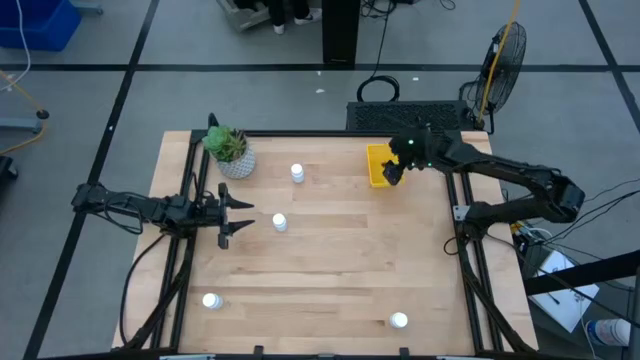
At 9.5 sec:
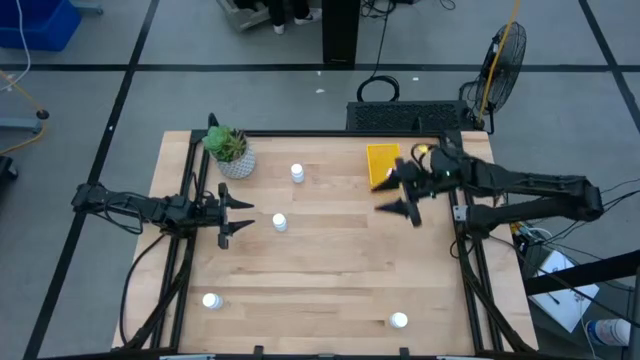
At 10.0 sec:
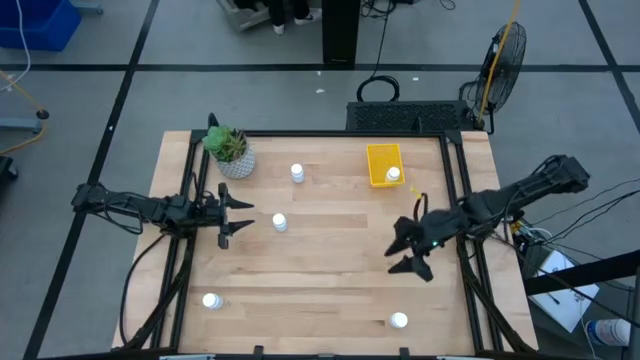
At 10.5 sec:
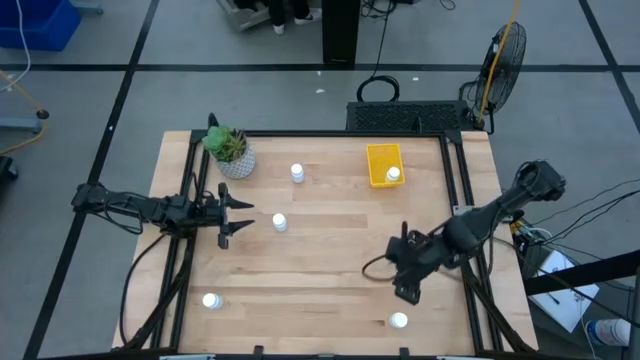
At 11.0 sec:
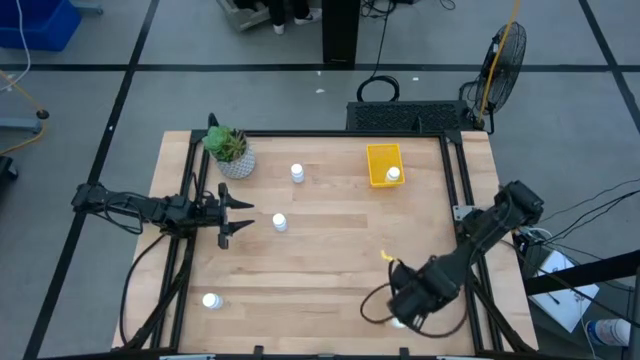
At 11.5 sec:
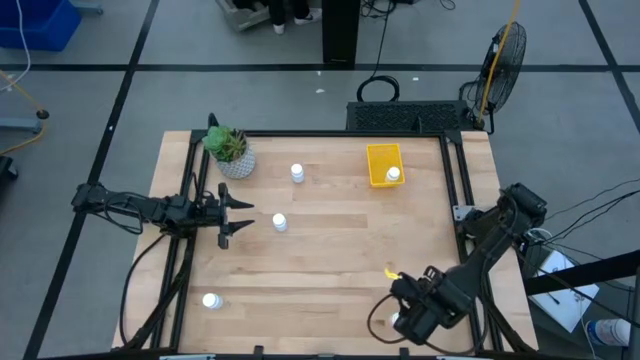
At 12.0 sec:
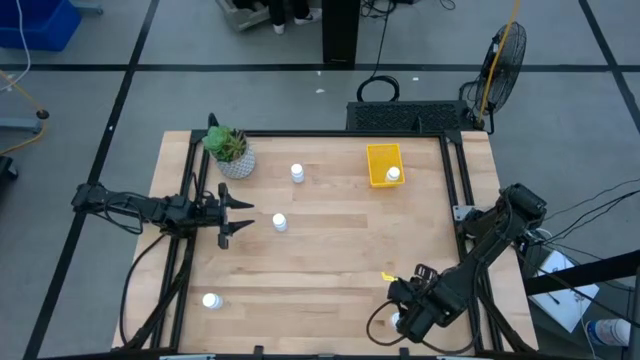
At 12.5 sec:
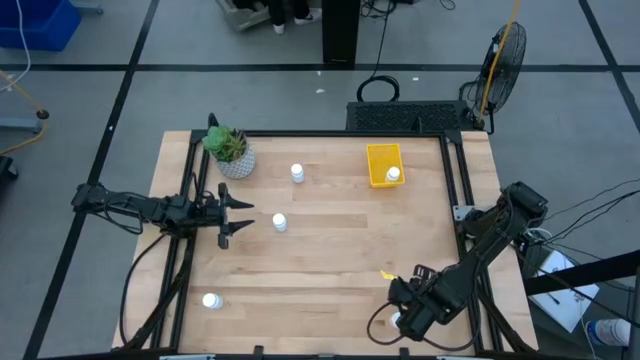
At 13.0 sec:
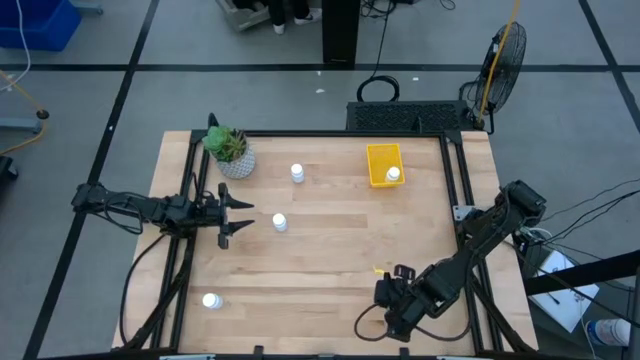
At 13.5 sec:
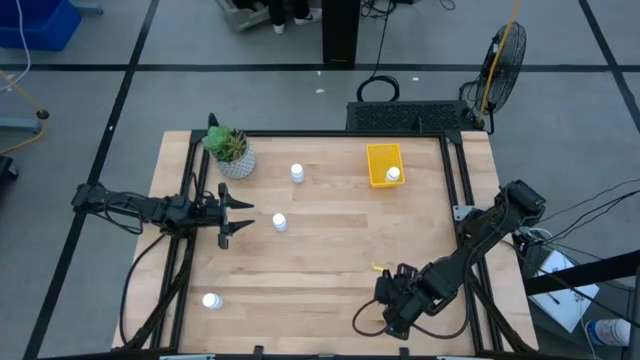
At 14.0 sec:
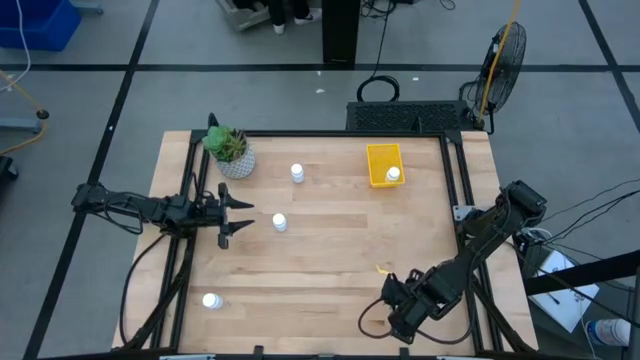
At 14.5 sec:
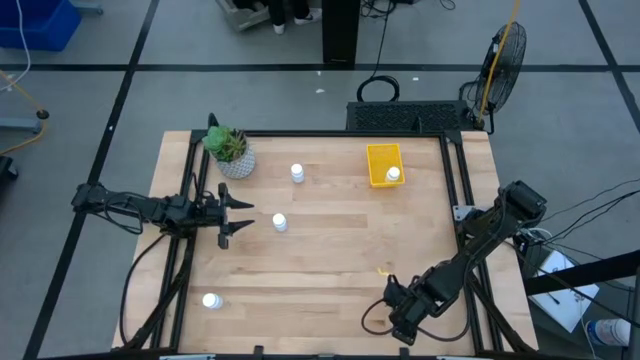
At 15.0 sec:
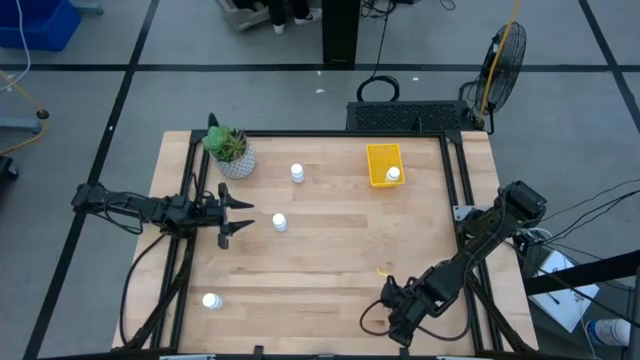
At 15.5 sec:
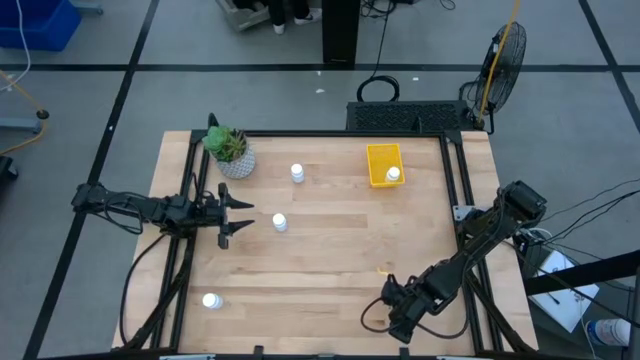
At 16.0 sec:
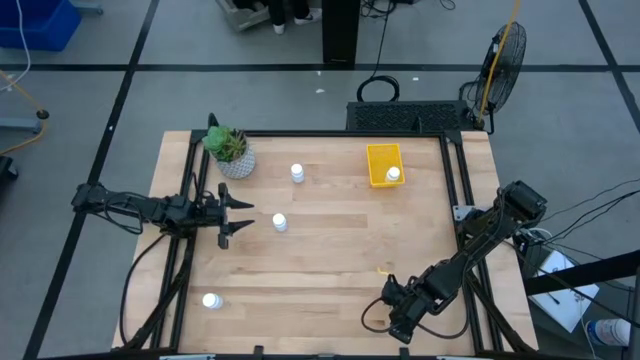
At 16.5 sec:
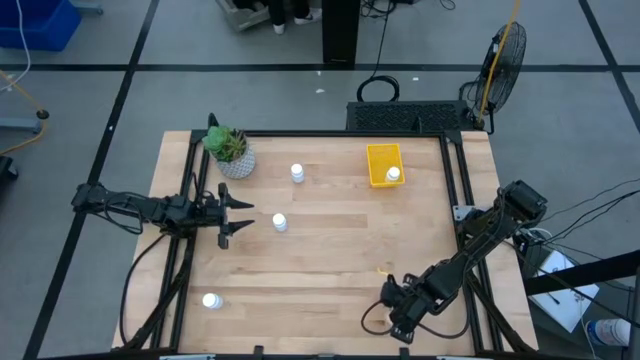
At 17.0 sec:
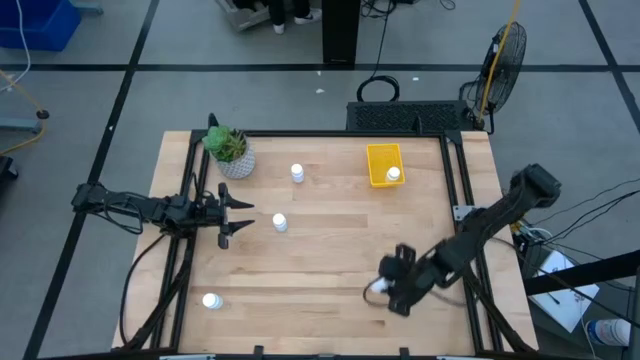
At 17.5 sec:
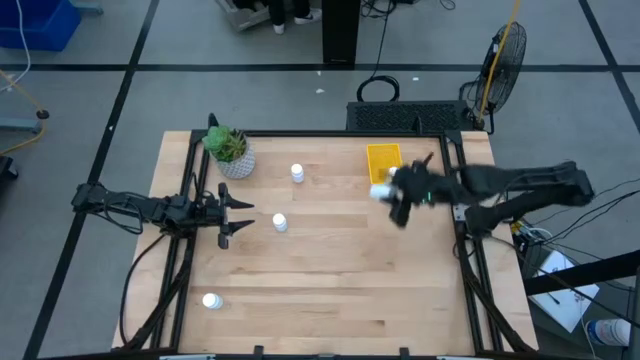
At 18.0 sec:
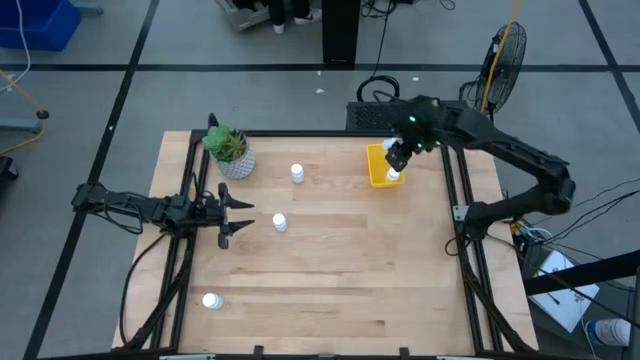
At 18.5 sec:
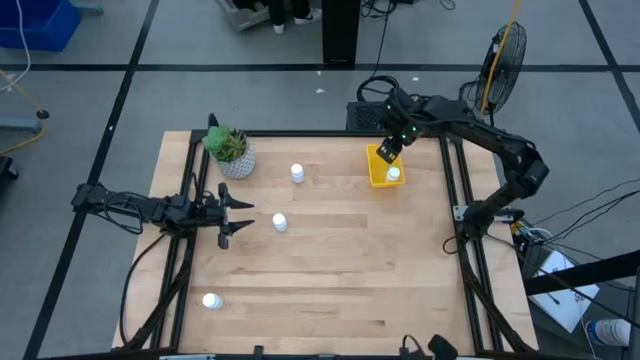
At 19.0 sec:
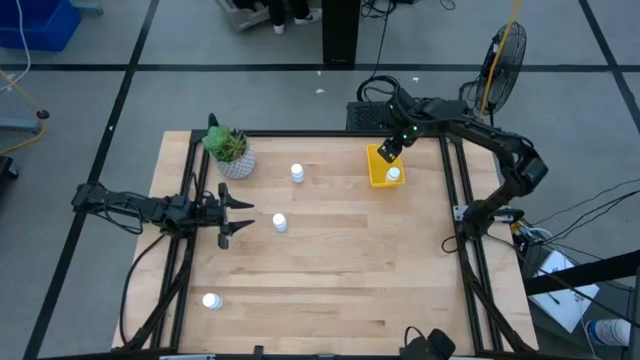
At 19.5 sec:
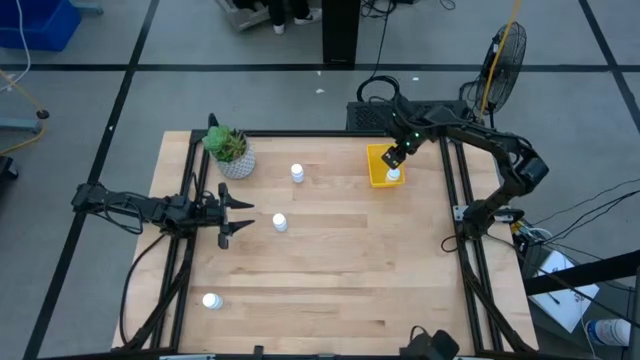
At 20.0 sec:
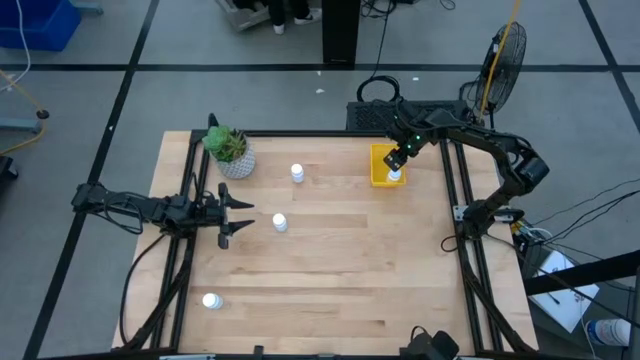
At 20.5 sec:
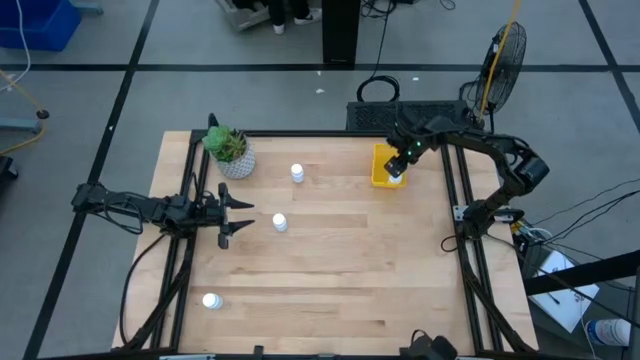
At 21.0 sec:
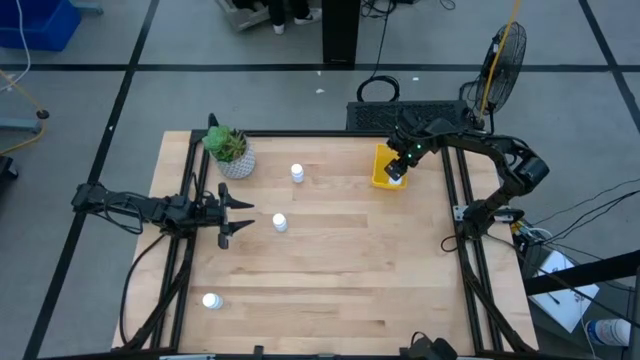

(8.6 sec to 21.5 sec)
Task: Pick and place pill bottles into a basket
Put the white medicine bottle into the yellow bin

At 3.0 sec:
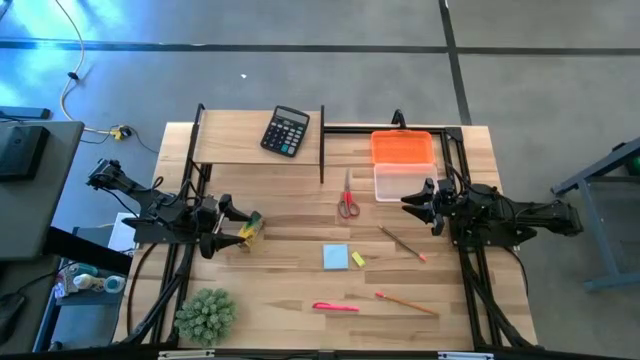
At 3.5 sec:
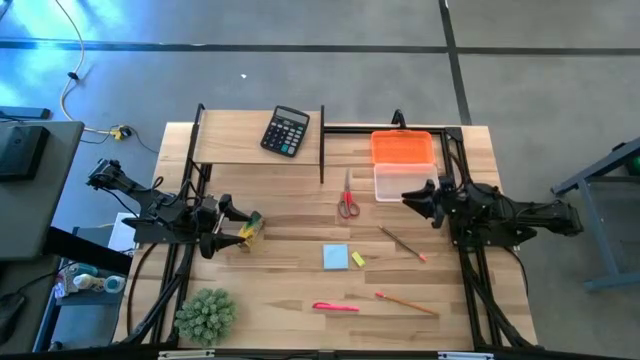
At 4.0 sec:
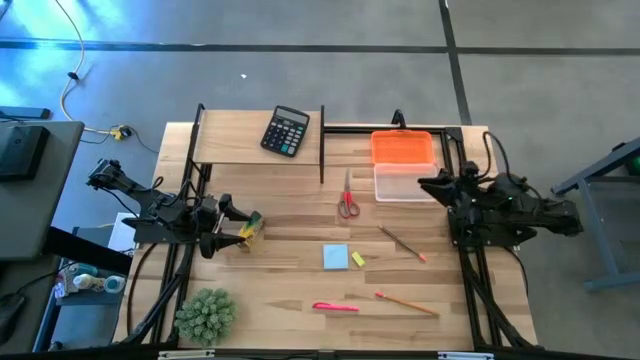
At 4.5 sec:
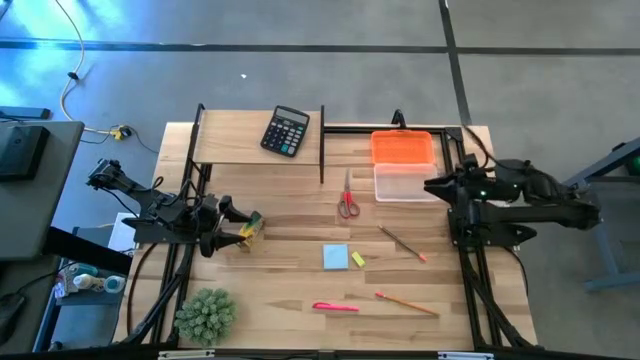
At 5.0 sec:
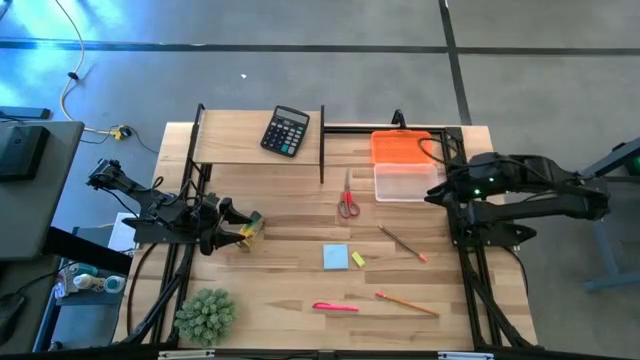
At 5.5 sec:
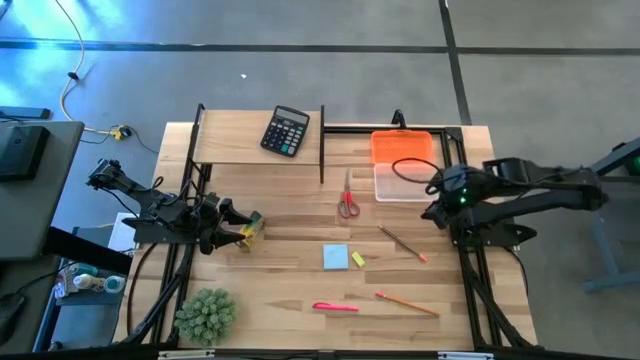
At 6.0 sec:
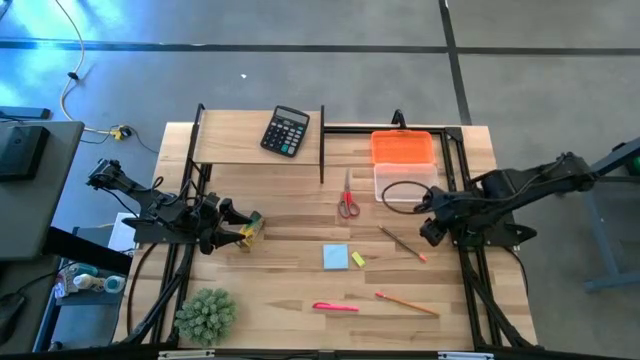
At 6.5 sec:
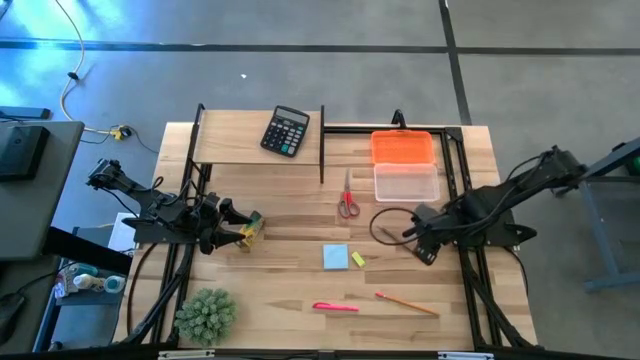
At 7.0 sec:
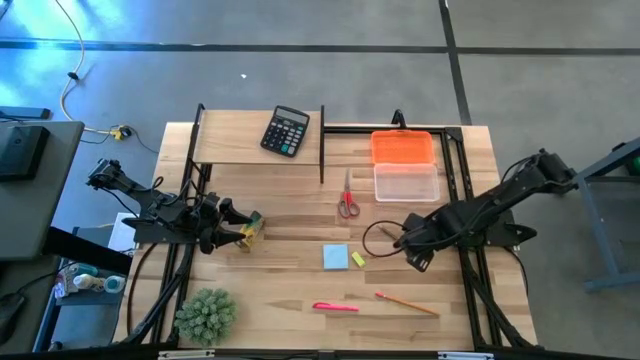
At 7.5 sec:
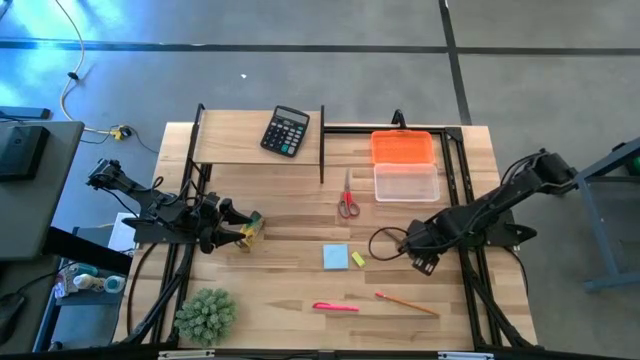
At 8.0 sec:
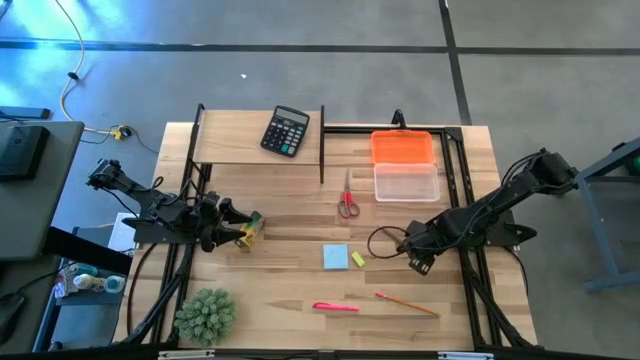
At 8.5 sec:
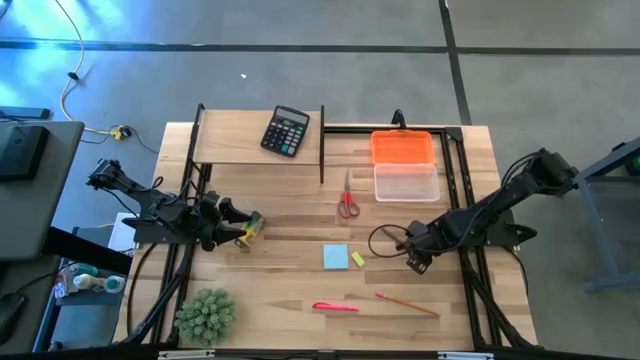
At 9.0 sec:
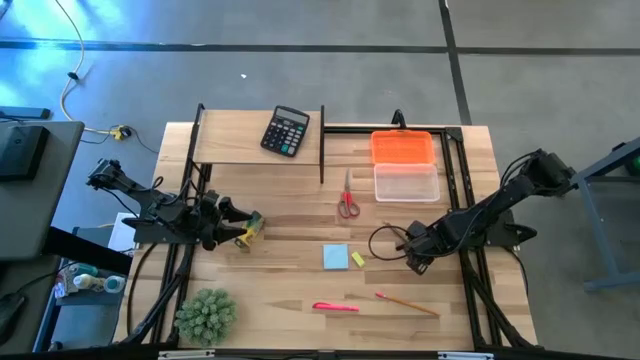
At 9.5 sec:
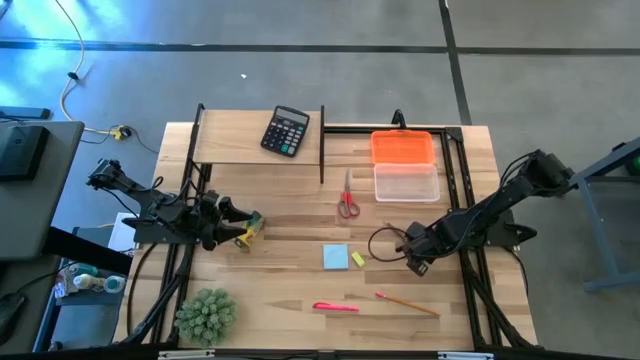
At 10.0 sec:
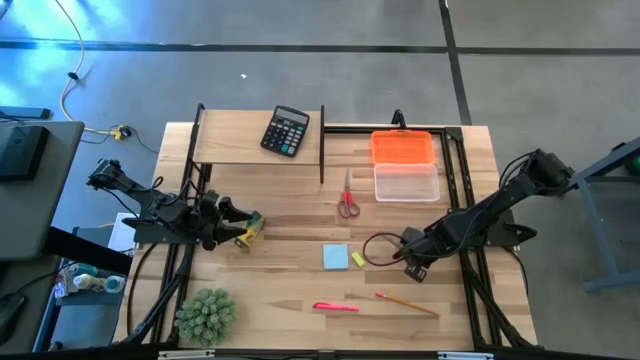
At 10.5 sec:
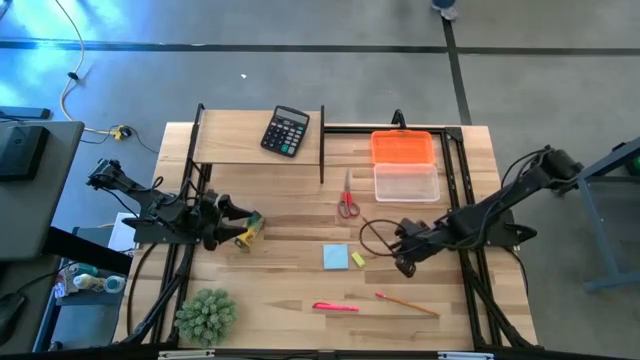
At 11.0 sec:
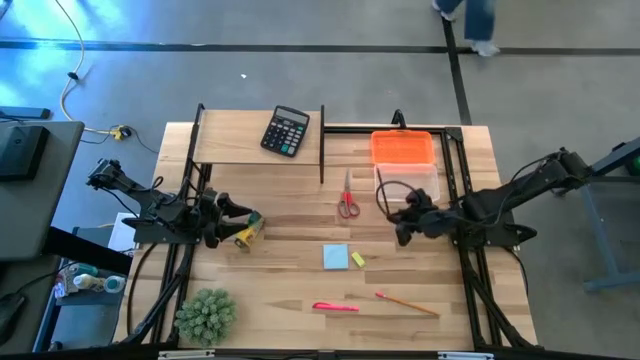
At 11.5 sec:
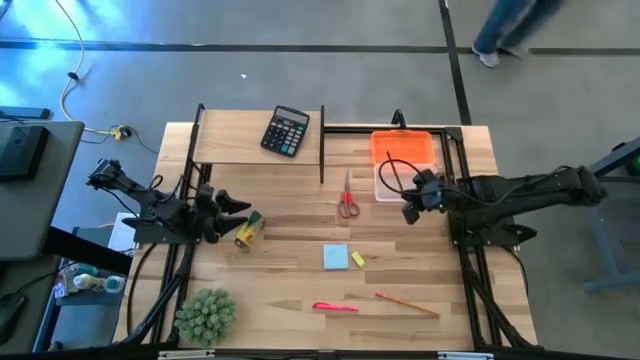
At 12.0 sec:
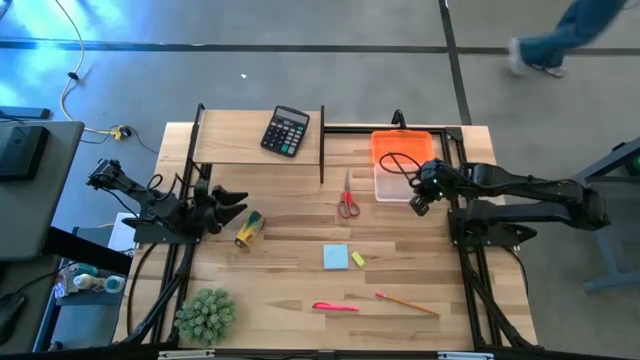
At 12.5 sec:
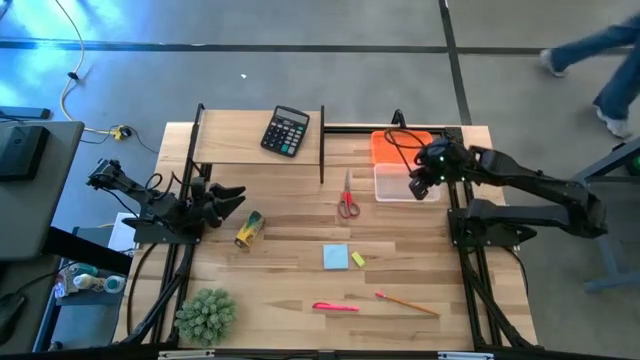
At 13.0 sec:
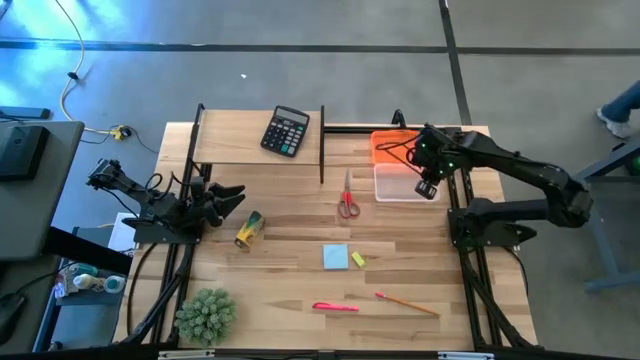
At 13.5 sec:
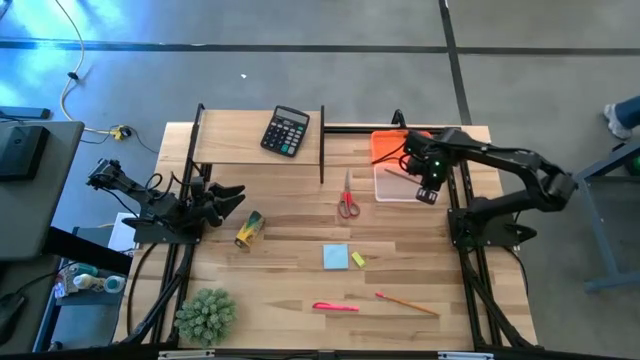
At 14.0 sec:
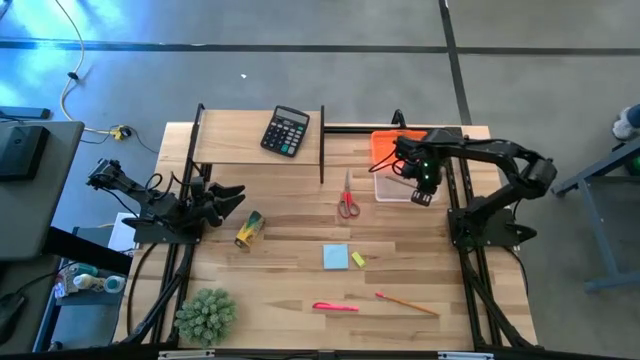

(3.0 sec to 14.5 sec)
Task: Pack school essentials
Put the black pencil into the orange supply box
